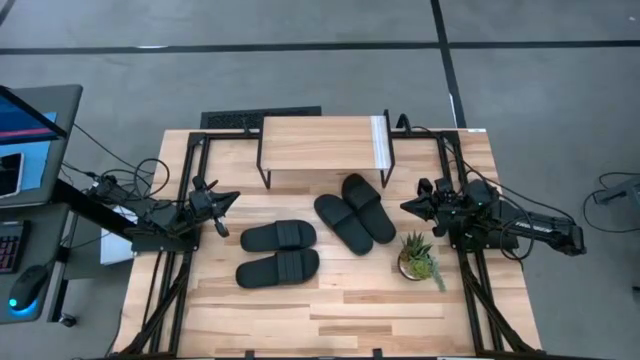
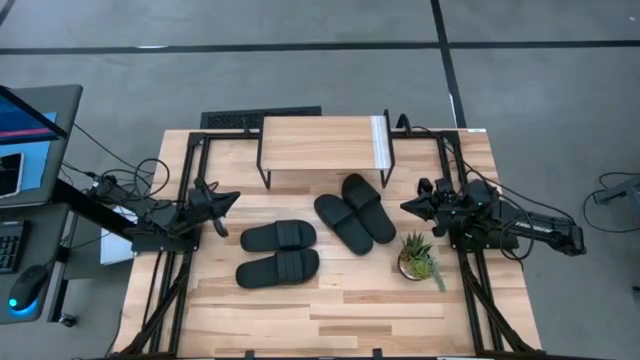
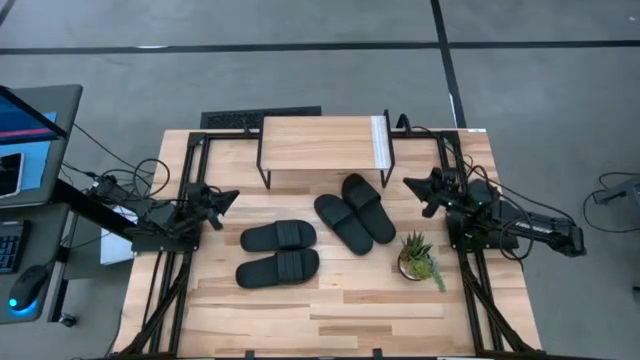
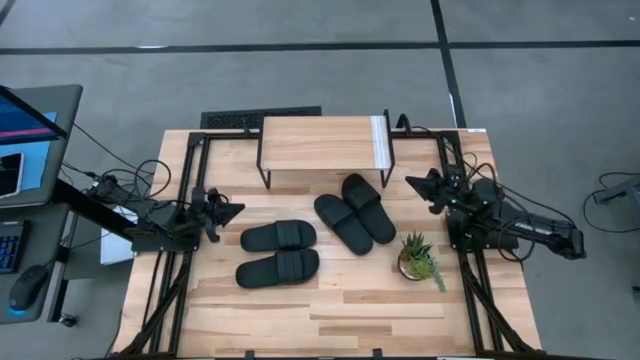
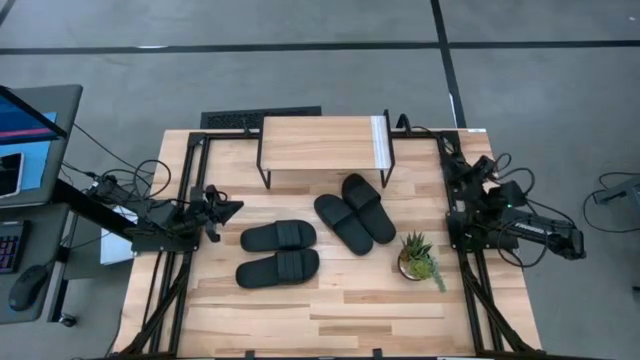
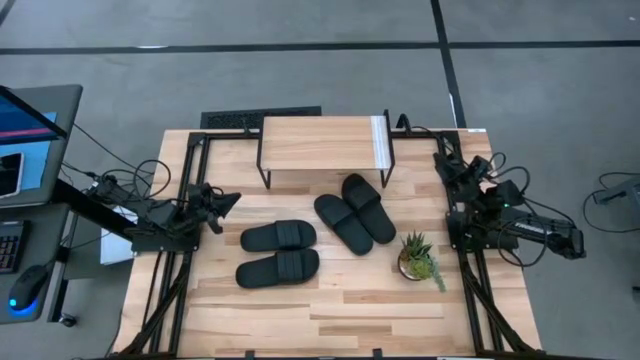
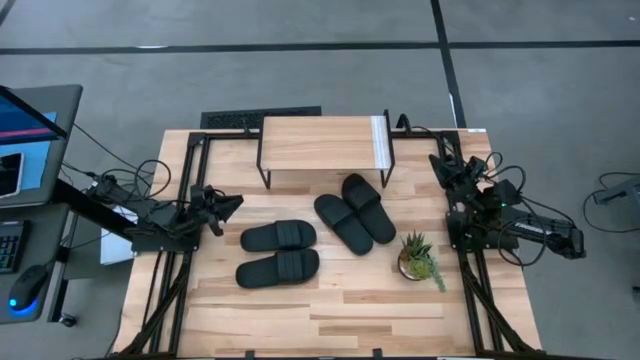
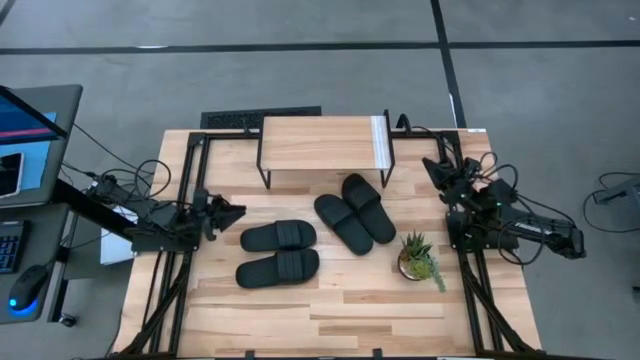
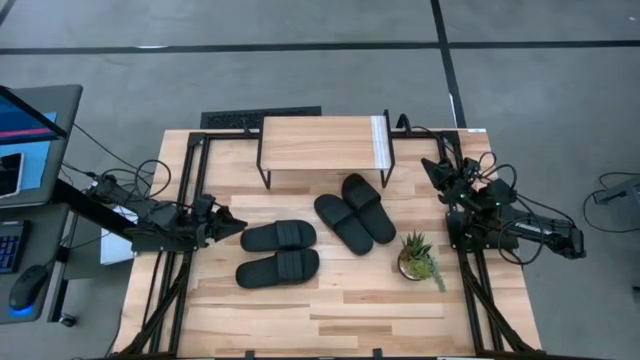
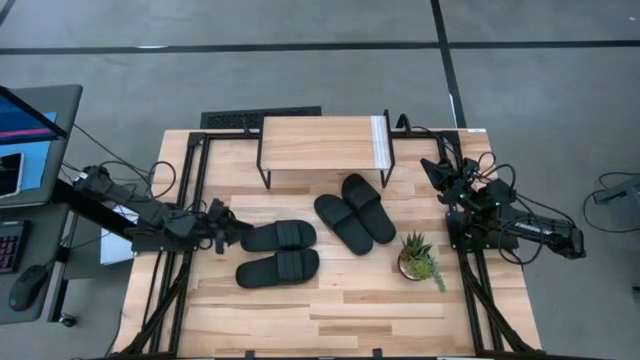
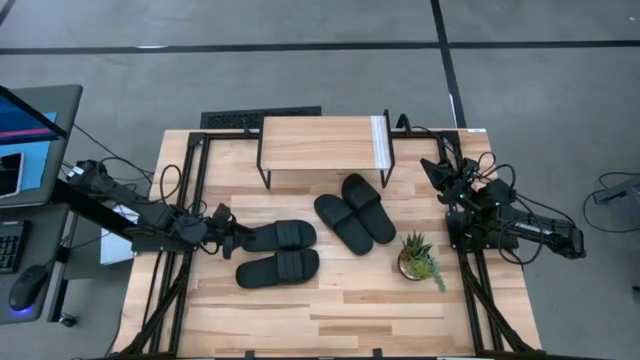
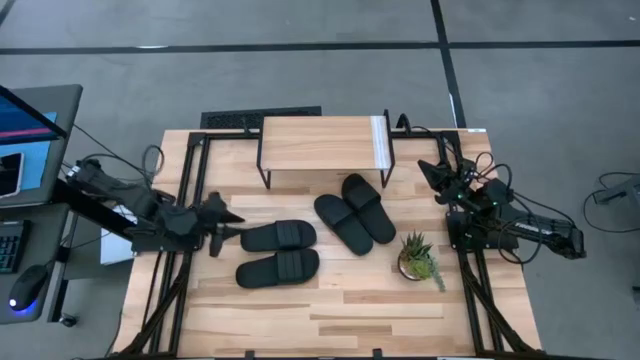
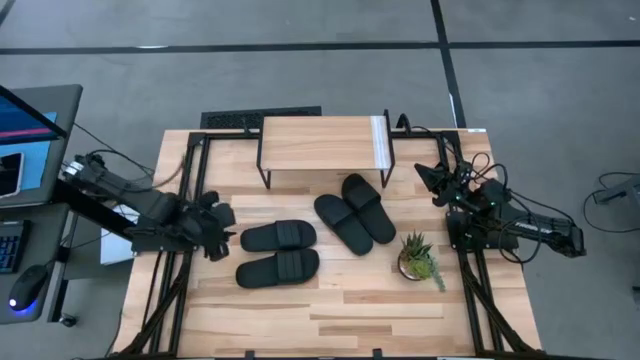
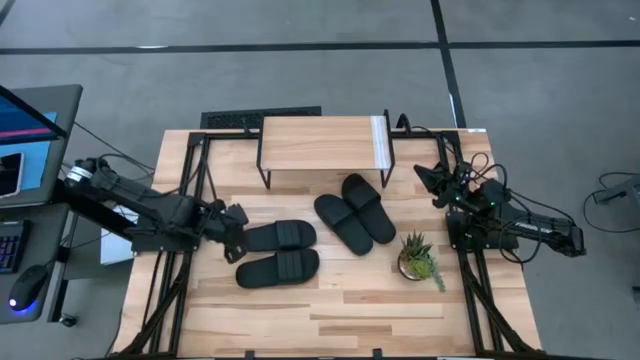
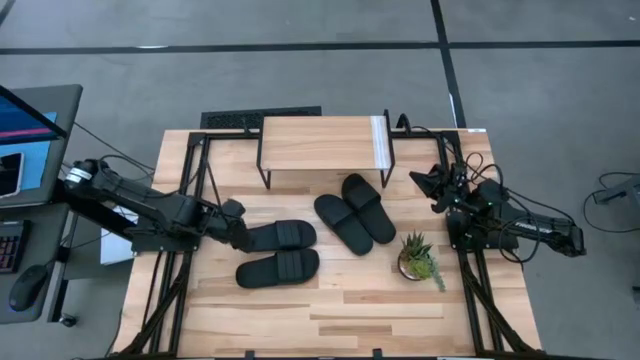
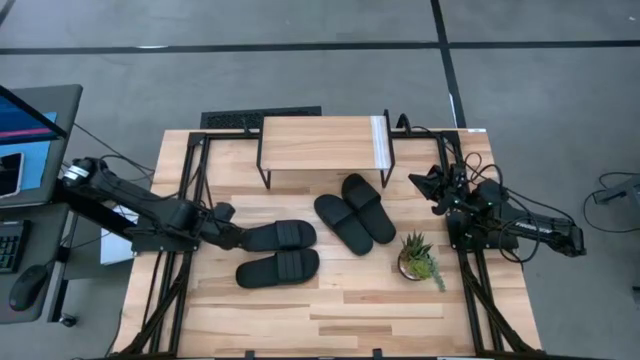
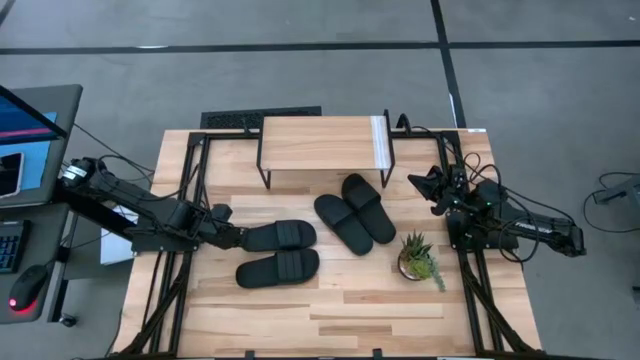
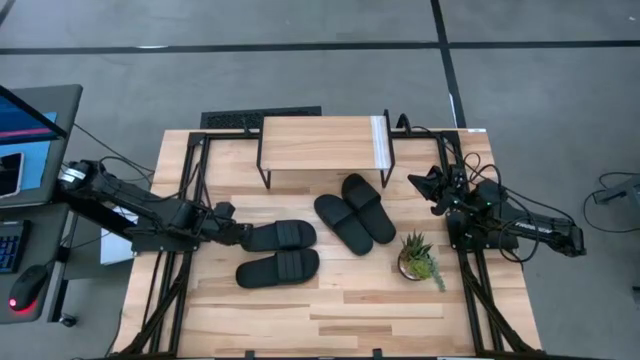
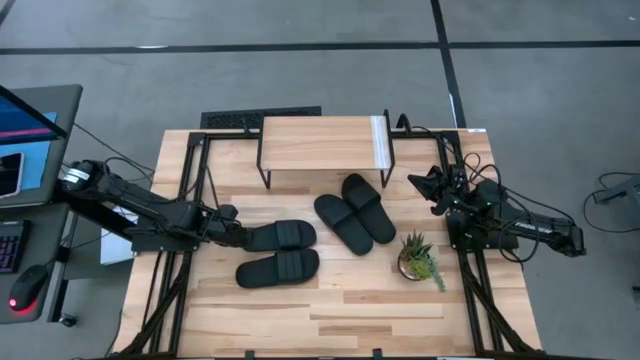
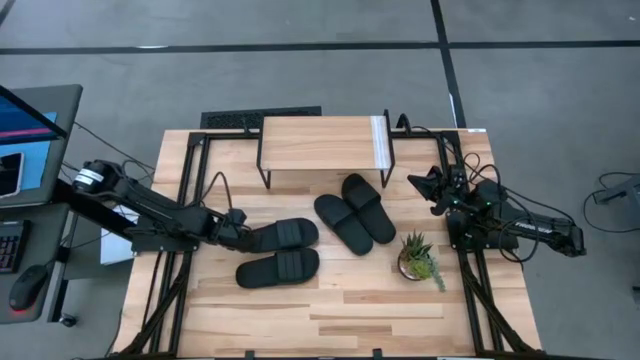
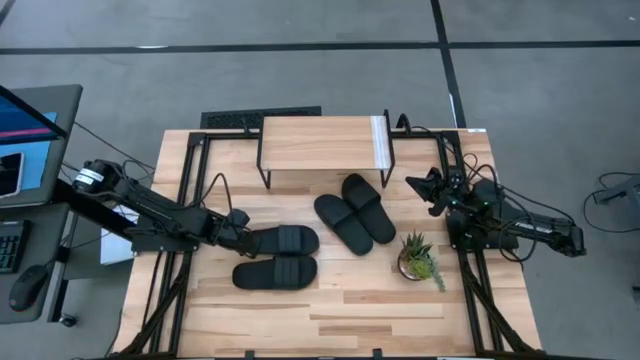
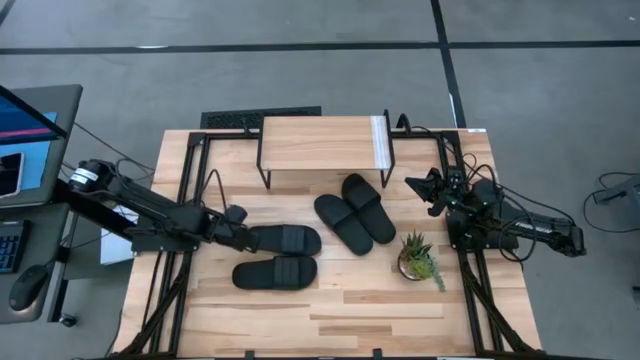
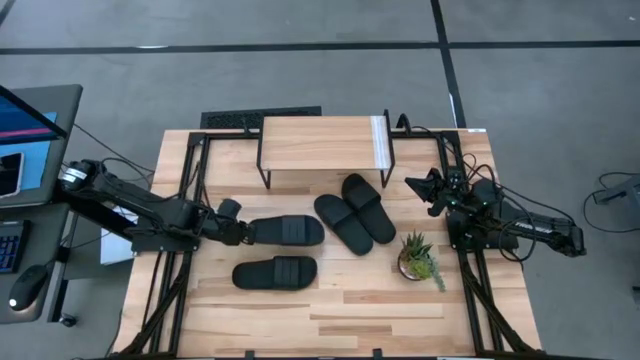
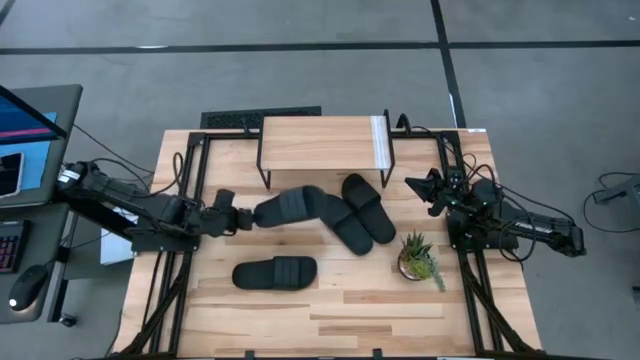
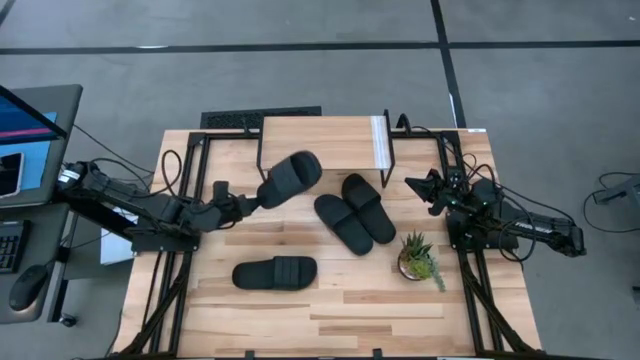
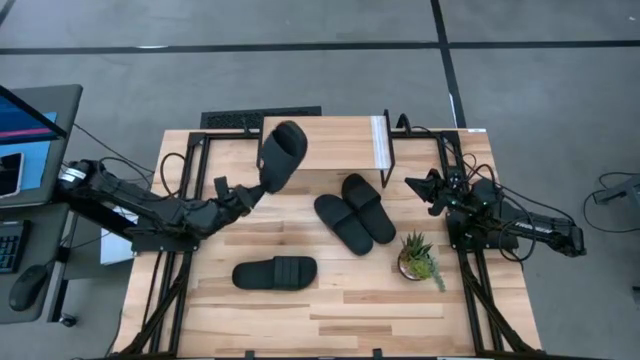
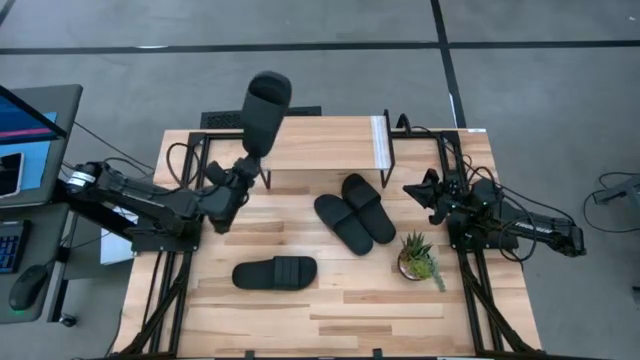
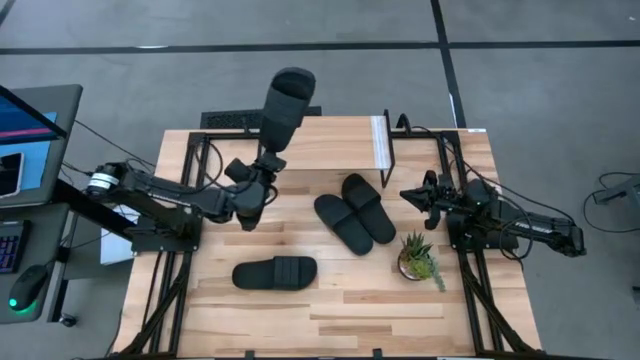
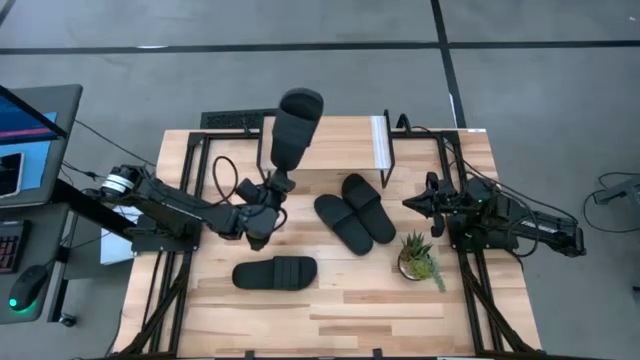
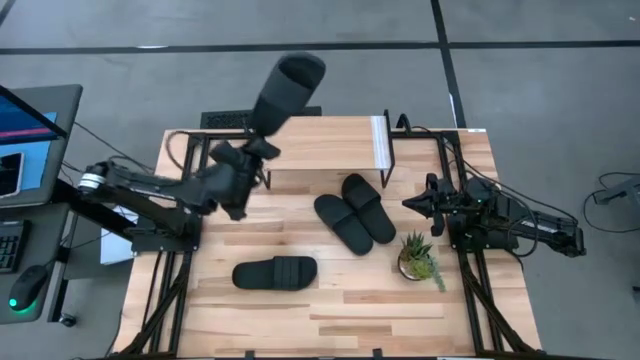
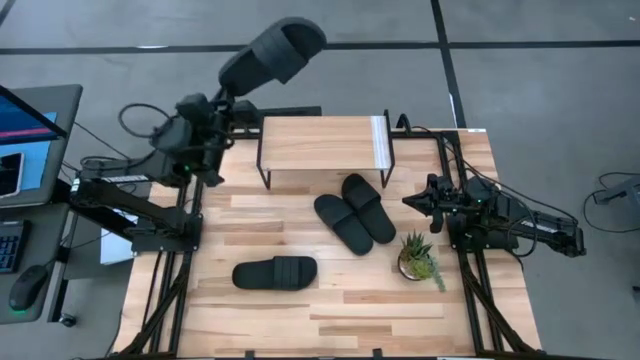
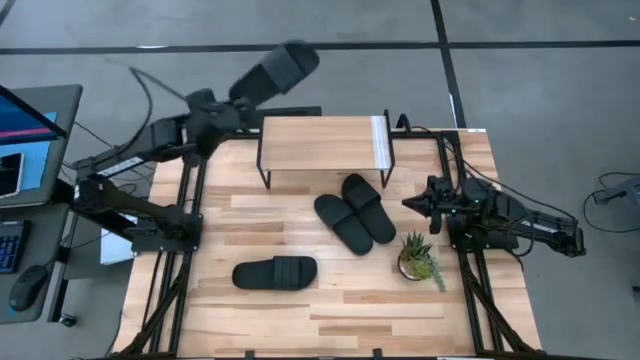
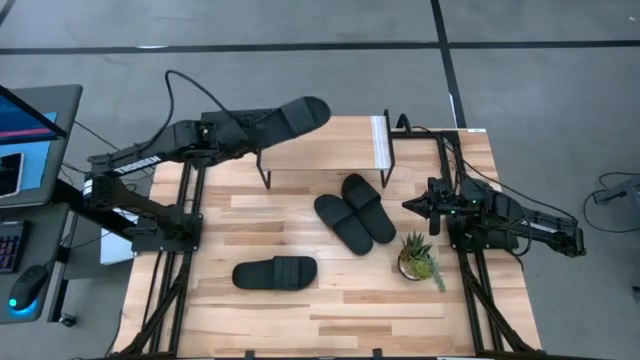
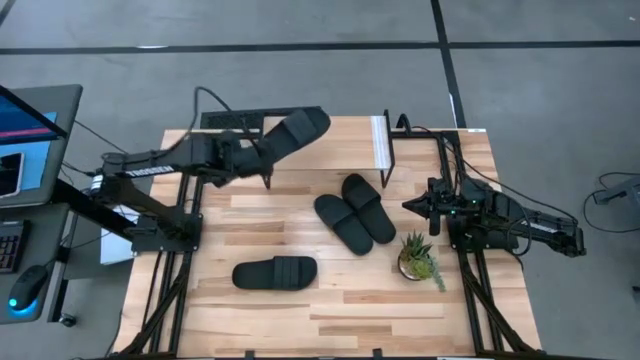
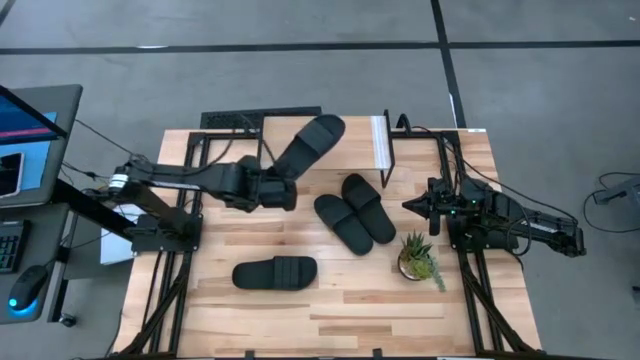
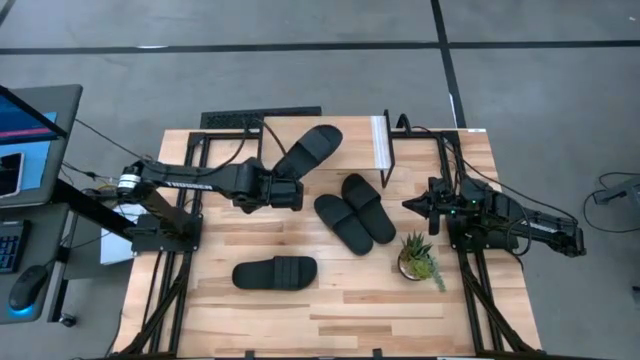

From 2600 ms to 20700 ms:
Task: Pick and place slides into the shelf
Put the black slipper on the shelf

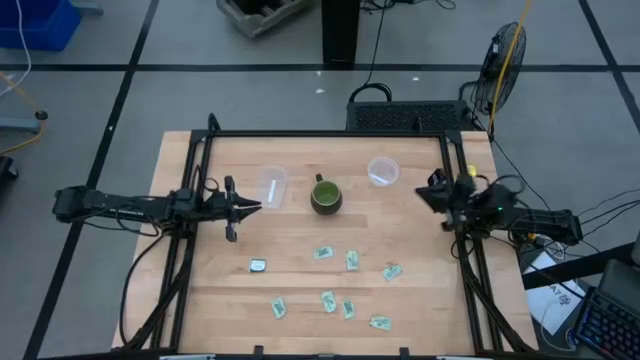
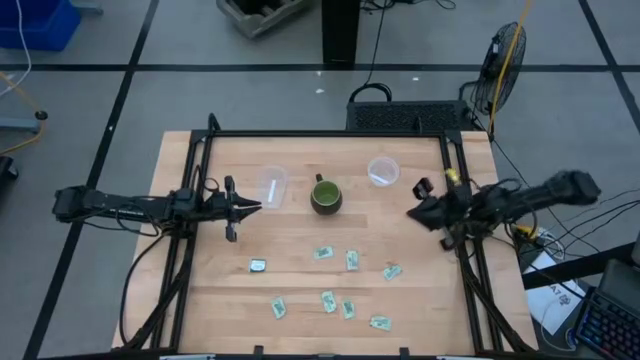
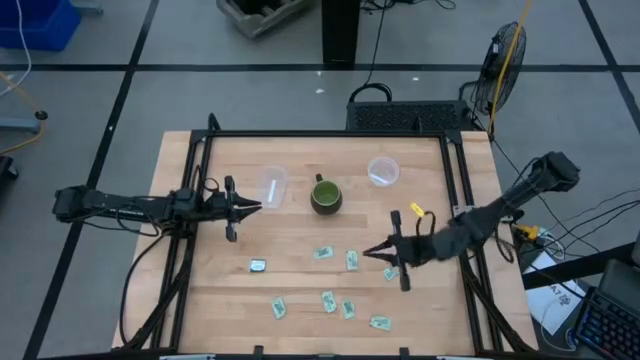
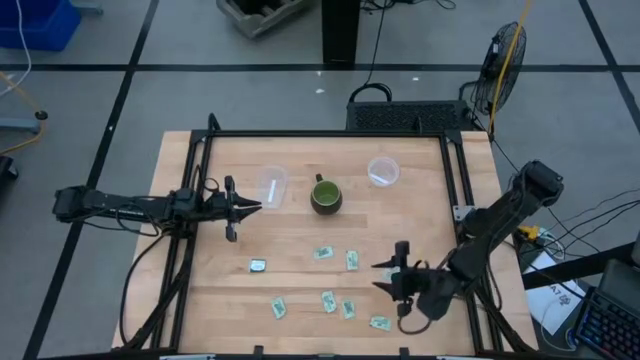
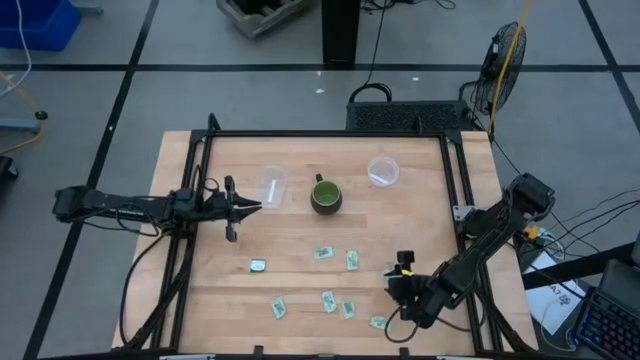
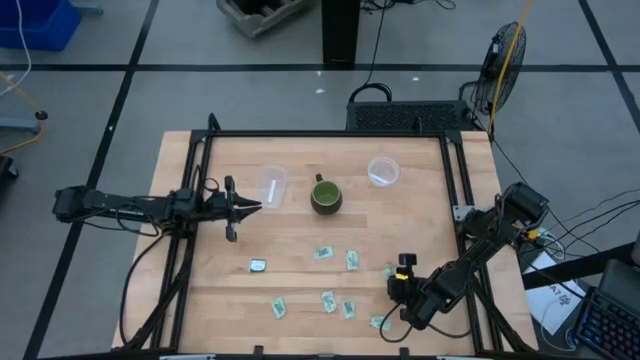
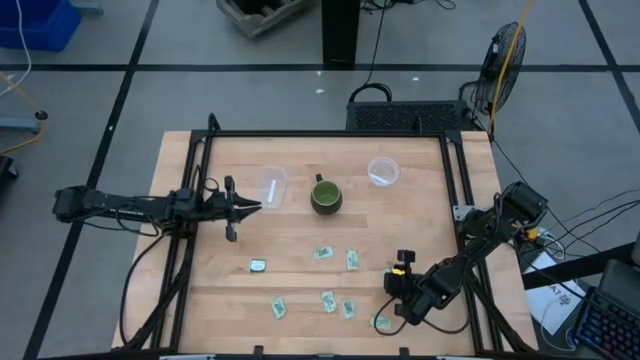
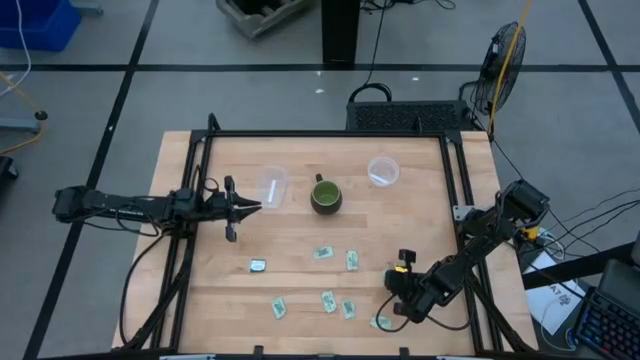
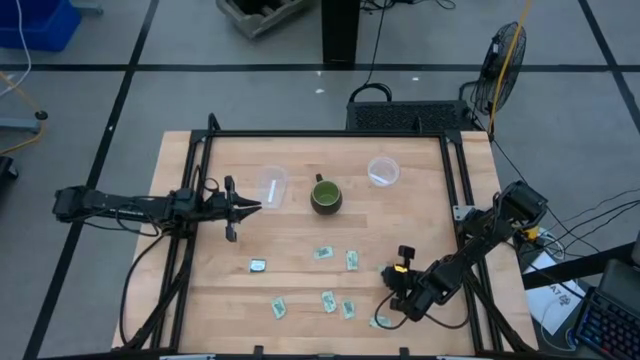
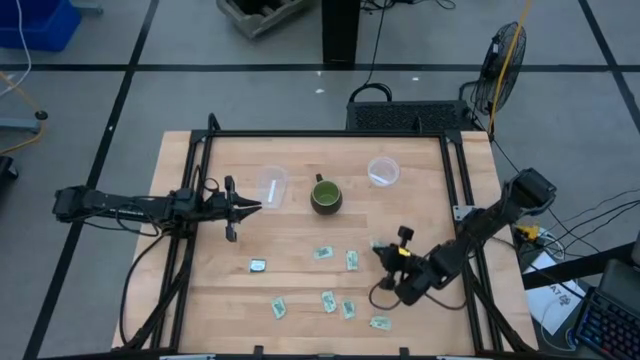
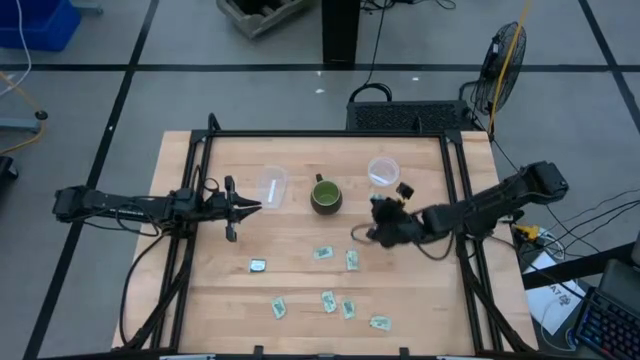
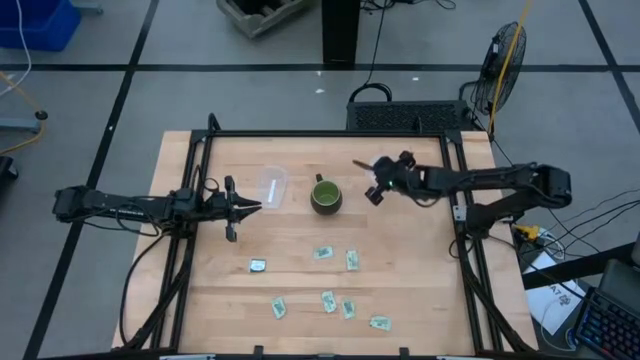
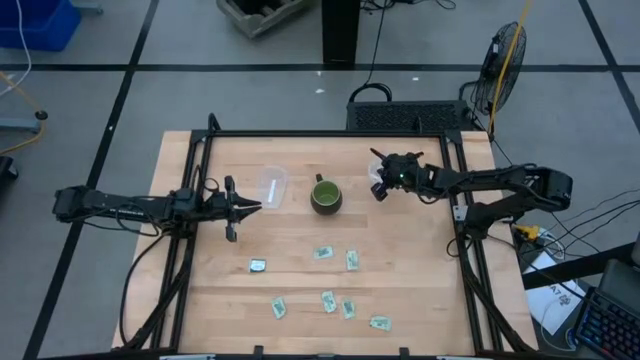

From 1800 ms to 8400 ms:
Task: Pick and place items into bin
Put the green stevia packet into the right transparent bin
